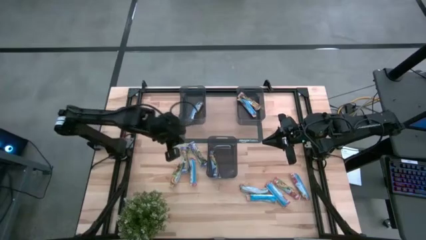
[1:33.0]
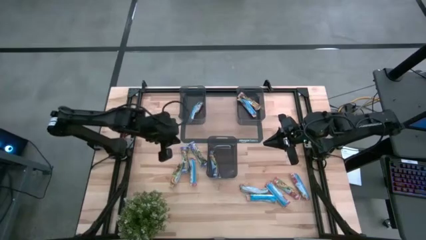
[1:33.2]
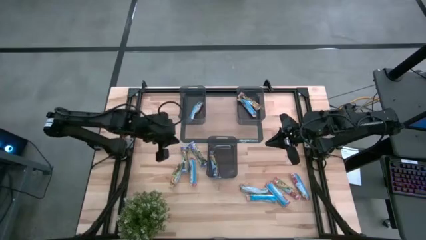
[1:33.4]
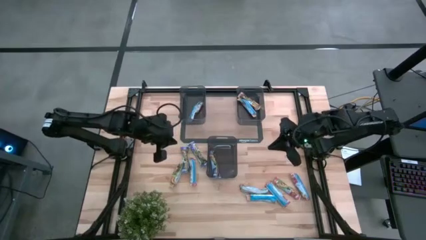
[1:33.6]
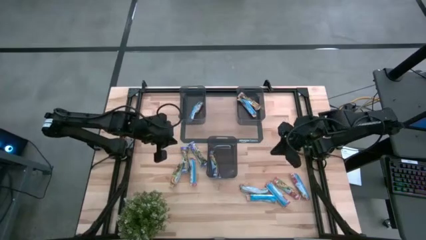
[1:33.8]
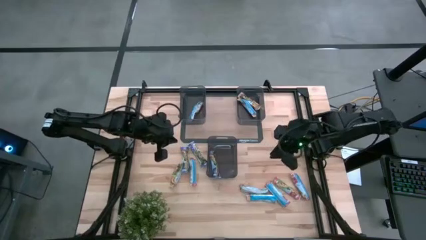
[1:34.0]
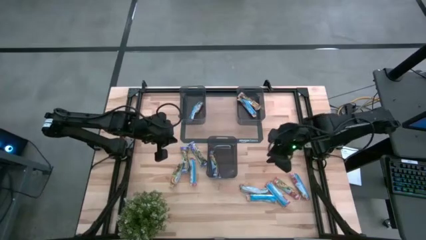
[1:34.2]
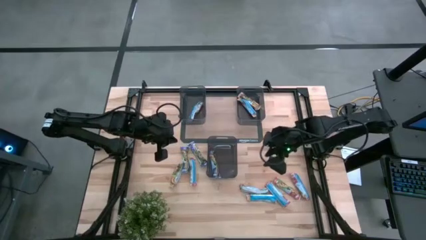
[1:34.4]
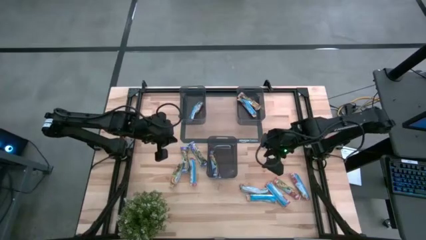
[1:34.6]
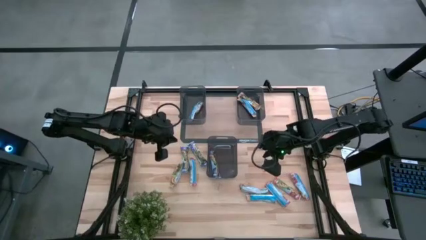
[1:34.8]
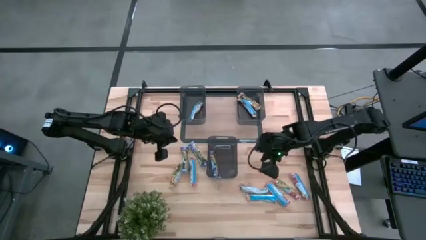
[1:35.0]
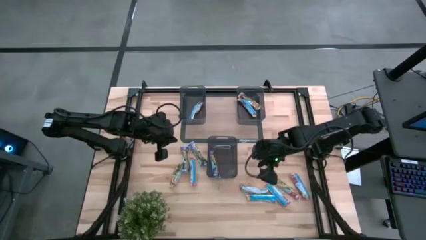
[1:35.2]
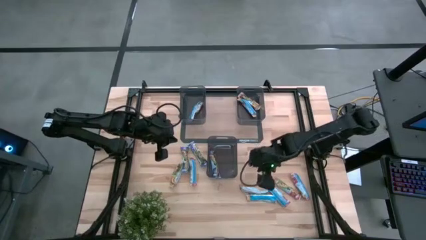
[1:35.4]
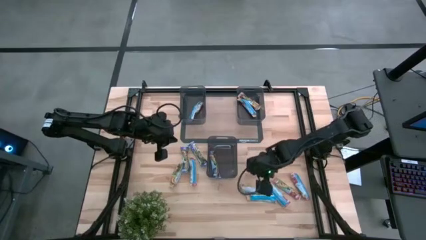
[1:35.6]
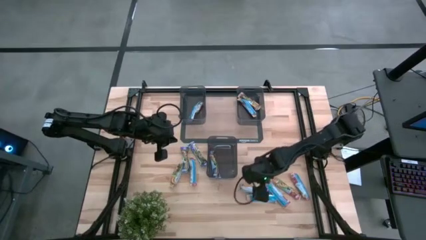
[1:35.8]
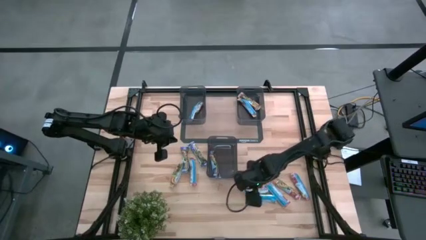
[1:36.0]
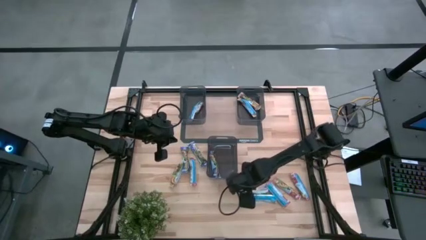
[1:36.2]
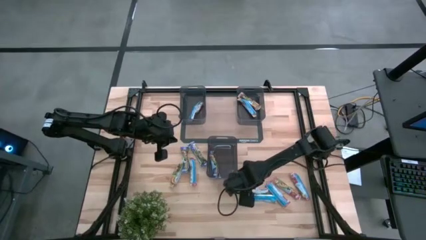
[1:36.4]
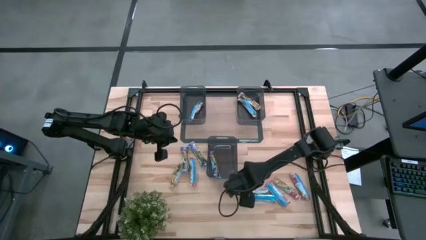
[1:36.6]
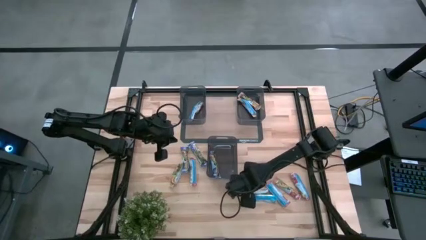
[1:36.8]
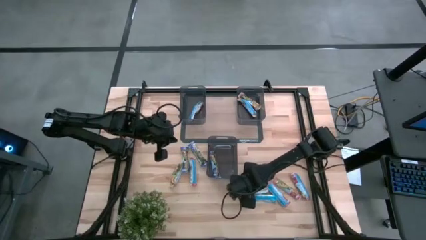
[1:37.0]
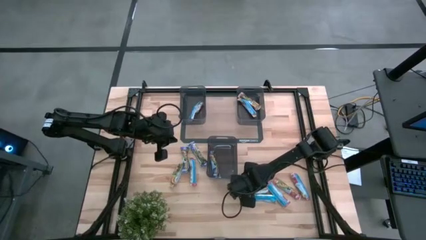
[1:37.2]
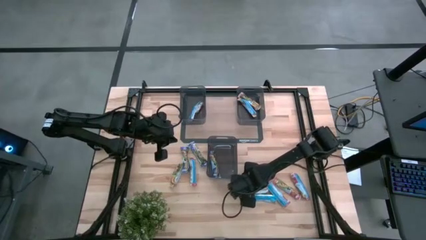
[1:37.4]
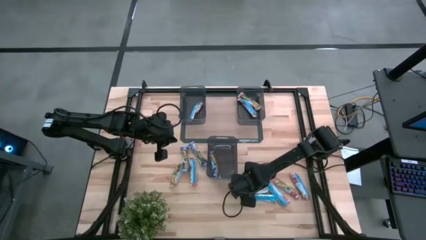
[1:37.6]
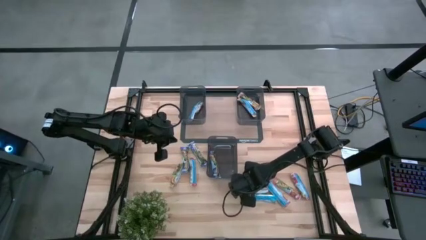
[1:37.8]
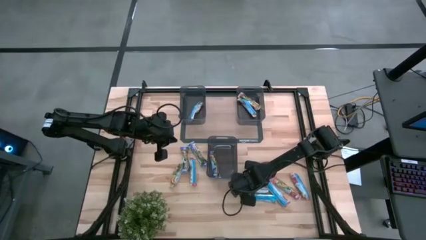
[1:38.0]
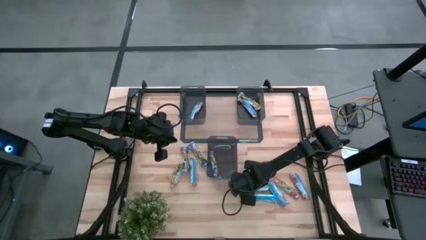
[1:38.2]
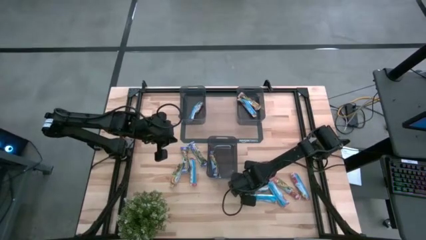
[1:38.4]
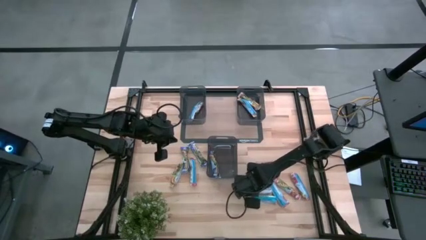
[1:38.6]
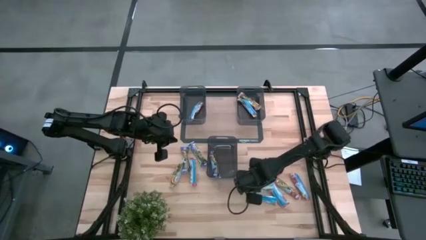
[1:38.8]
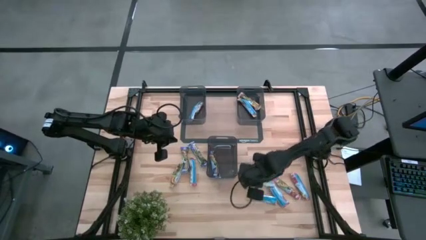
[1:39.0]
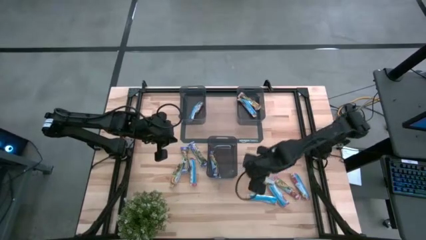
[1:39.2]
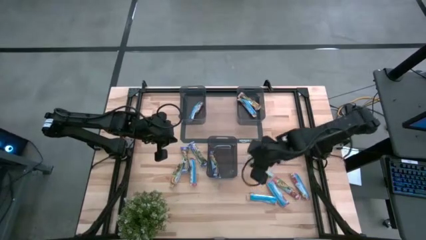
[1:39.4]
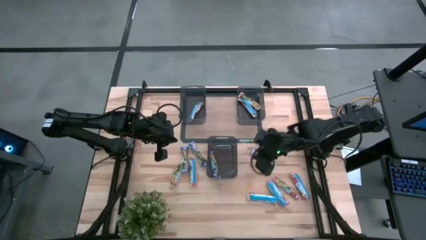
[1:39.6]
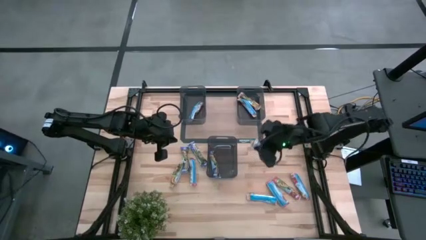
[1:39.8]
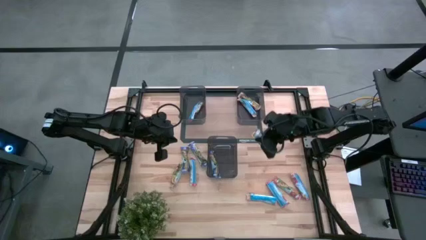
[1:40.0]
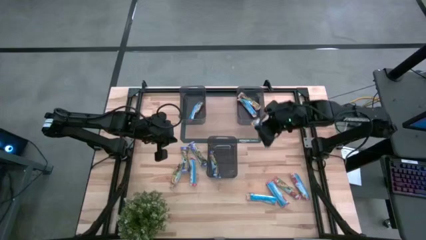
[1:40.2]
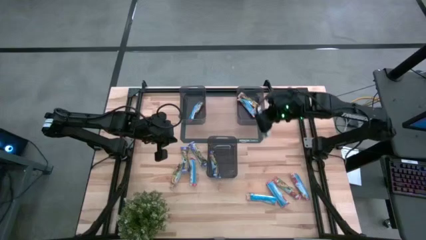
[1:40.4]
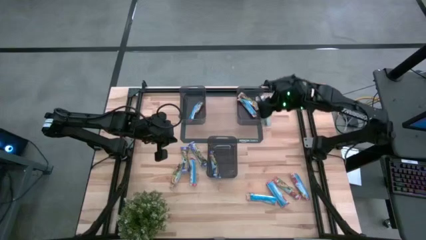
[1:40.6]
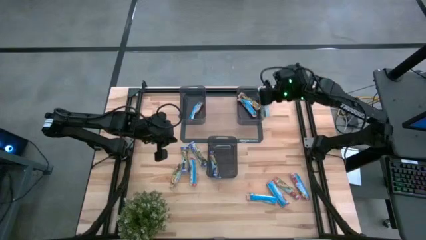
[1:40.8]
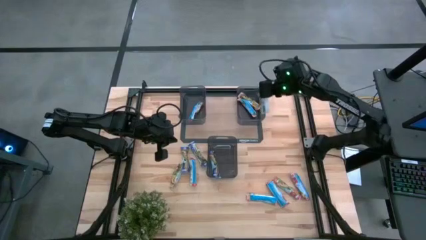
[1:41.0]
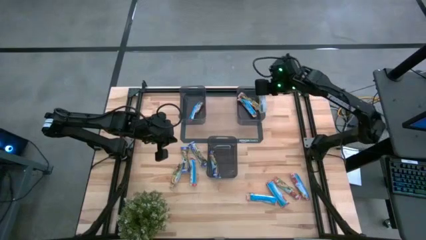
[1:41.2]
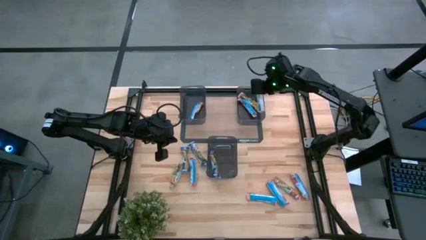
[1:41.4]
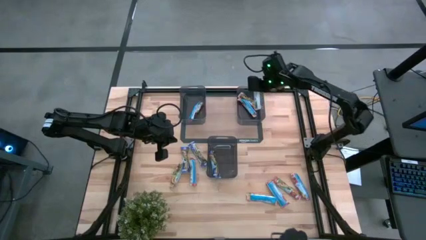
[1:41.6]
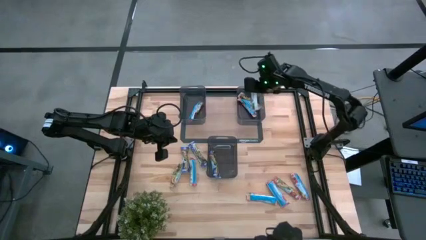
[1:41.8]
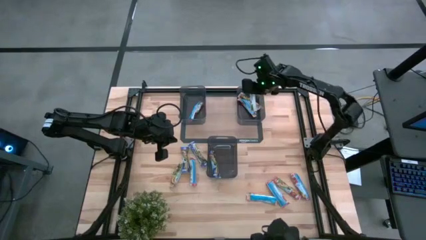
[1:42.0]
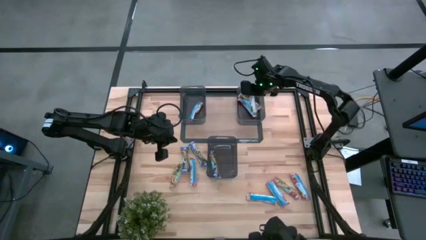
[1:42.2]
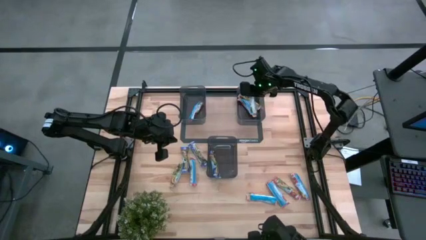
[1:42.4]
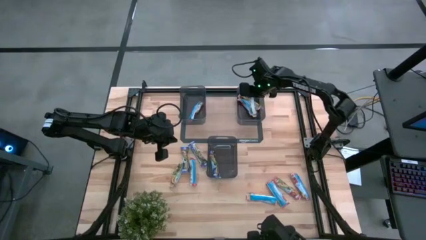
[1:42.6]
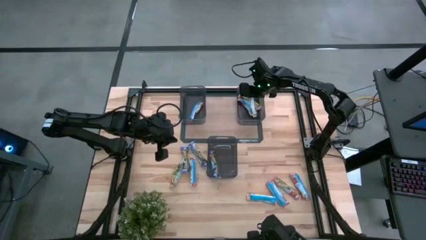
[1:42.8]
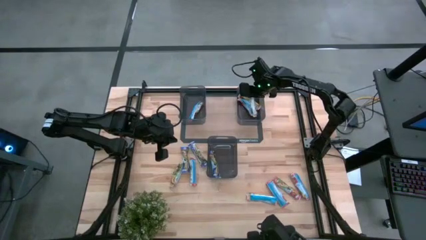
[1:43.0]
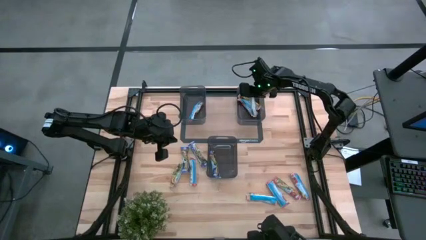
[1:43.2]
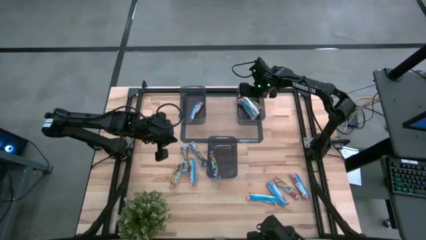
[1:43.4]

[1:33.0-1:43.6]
Task: Pick and place Granola Bars by type
Put the yellow granola bar into the right black bin

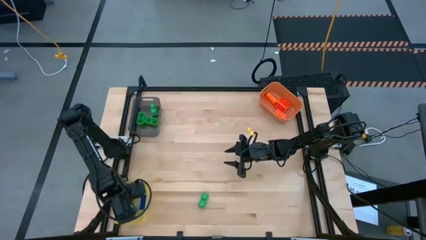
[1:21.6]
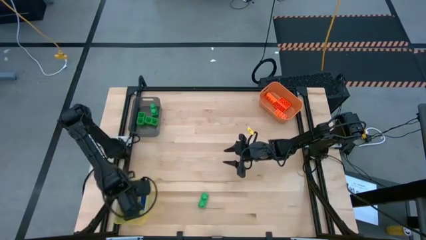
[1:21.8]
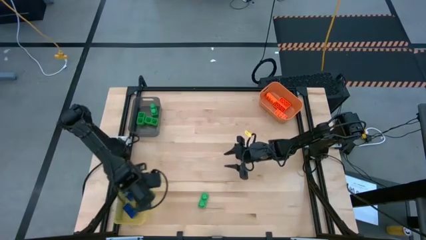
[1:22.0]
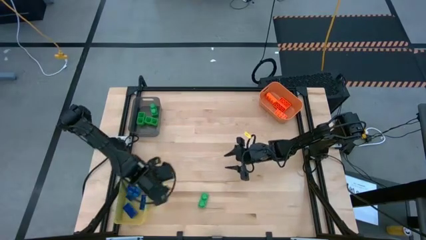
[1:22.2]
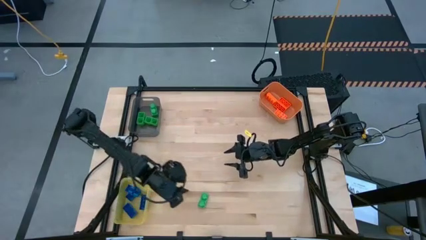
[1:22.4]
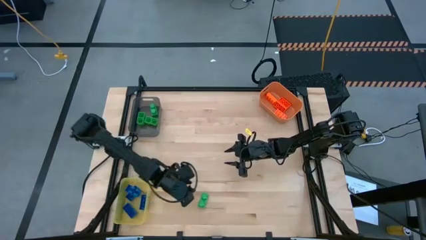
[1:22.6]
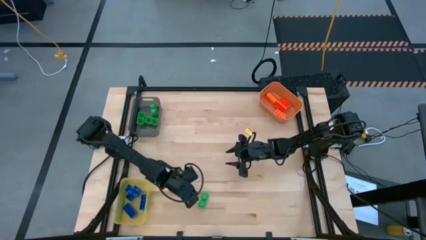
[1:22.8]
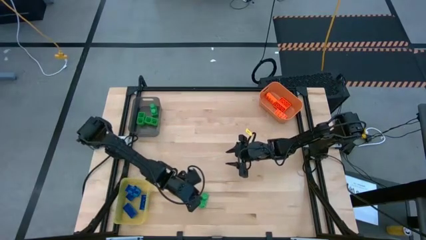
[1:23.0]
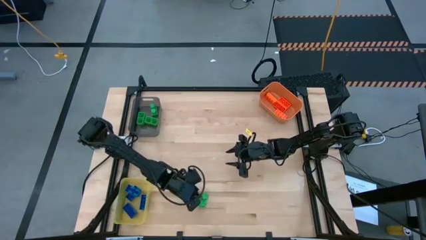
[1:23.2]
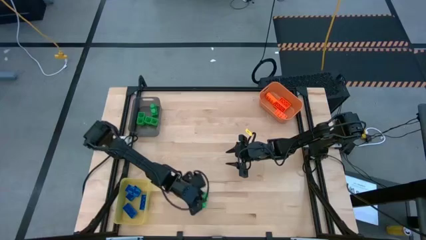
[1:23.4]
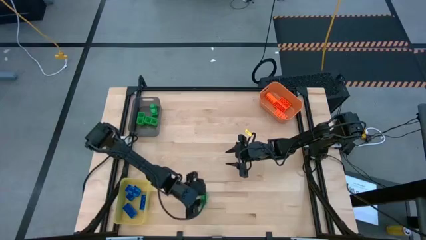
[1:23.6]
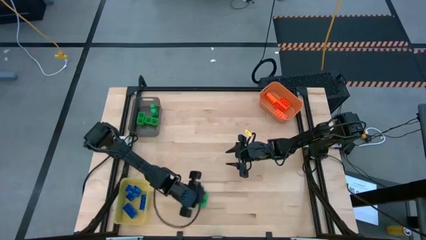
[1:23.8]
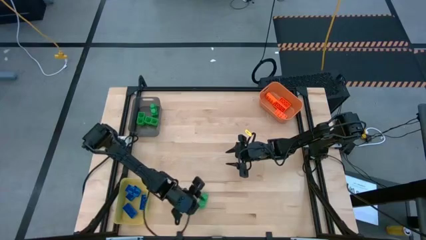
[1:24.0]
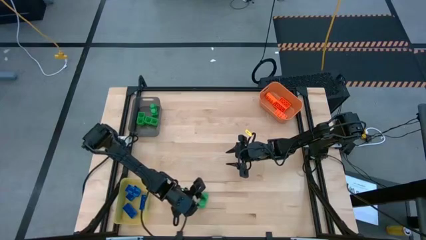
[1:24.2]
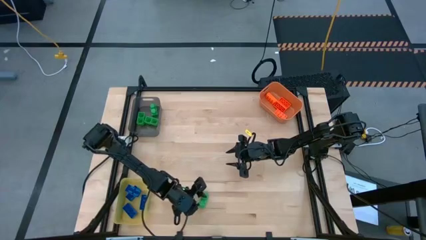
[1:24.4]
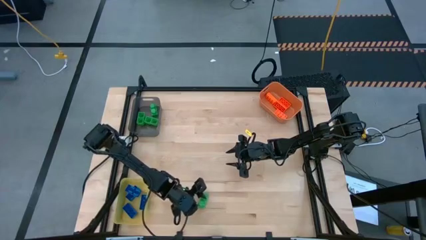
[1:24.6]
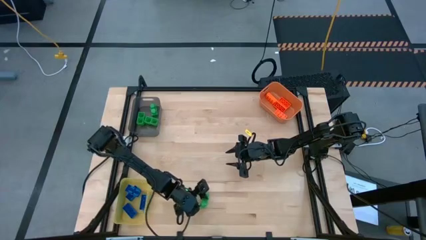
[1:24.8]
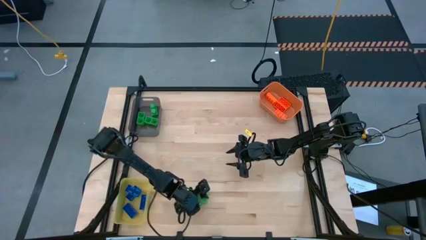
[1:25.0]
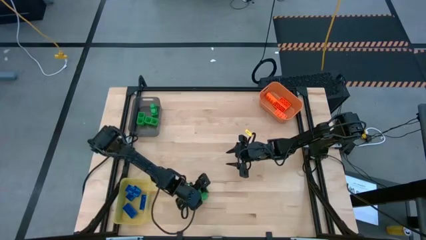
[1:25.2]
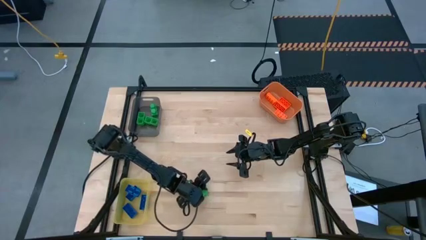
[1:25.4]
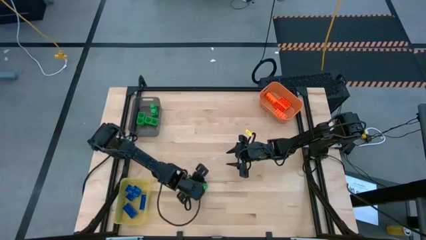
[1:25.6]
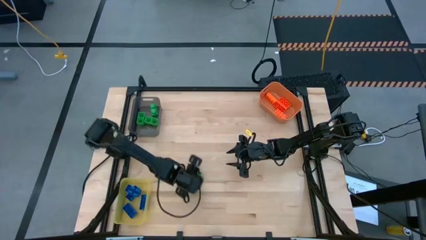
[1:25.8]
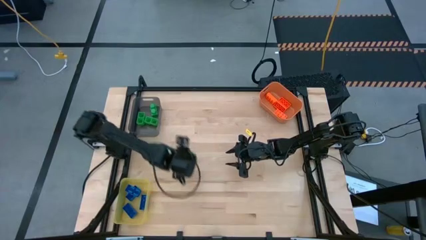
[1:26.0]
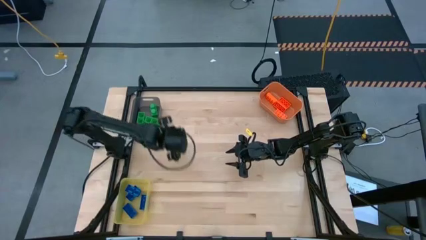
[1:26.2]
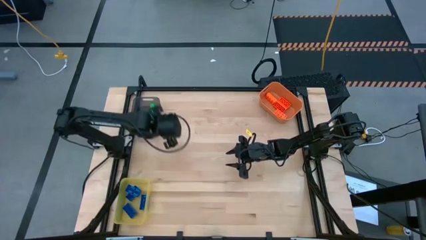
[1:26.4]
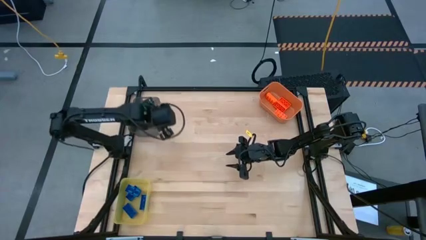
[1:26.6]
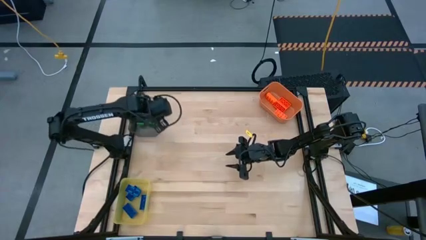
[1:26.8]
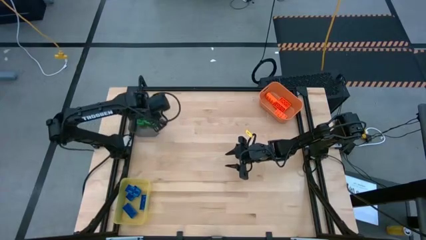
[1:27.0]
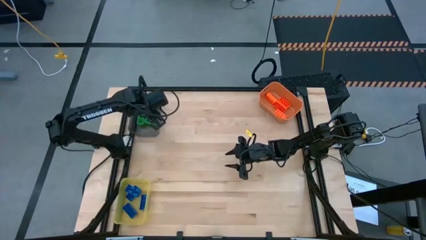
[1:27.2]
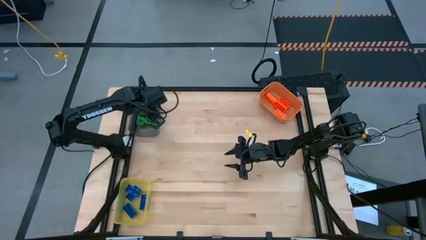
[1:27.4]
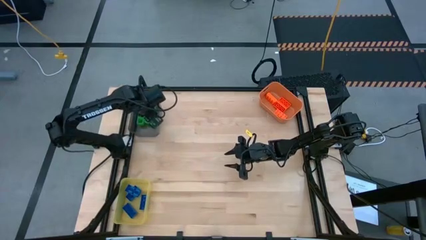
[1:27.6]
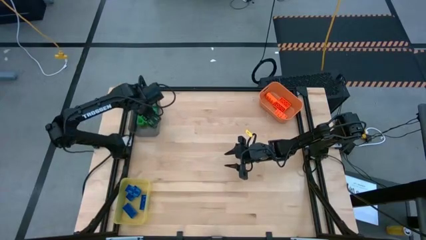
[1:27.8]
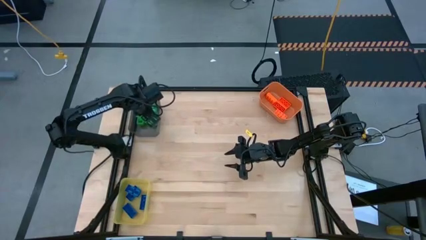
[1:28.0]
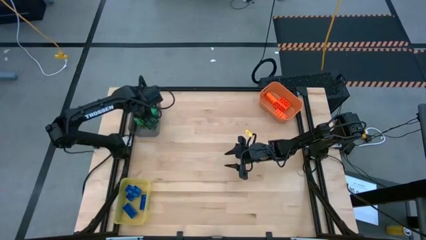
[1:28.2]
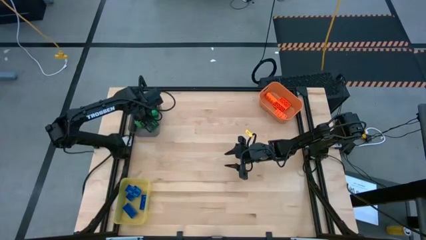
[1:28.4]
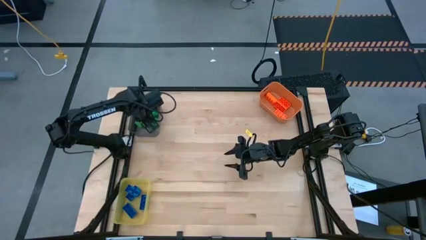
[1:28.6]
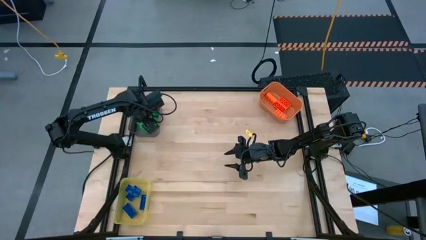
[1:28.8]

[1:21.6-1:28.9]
Task: Sort & place blocks by color
Put the green game piece into the black bin
